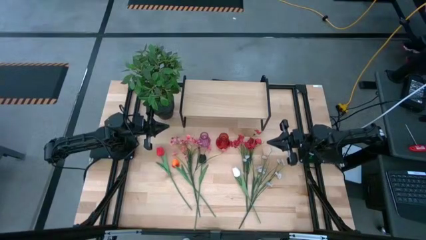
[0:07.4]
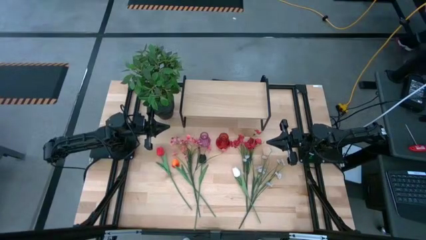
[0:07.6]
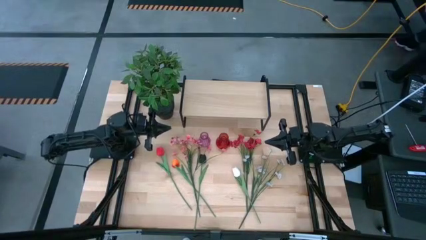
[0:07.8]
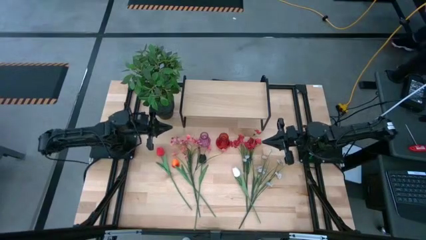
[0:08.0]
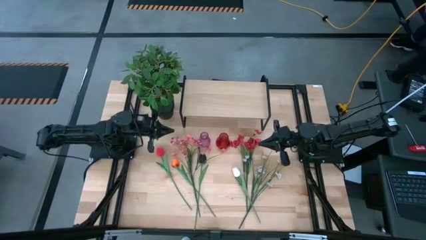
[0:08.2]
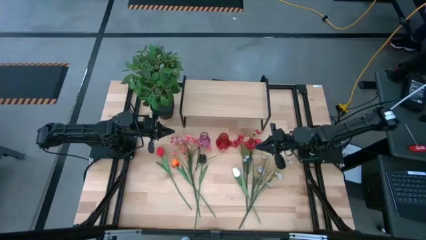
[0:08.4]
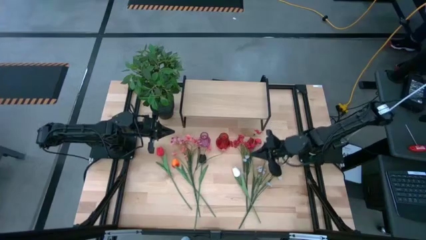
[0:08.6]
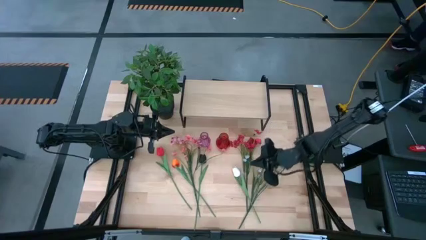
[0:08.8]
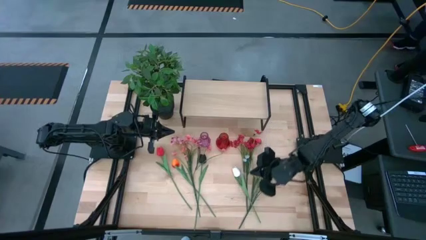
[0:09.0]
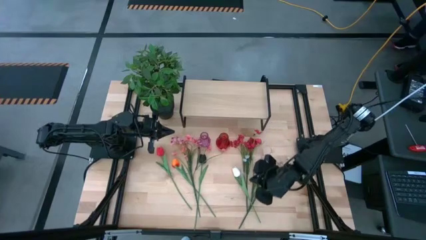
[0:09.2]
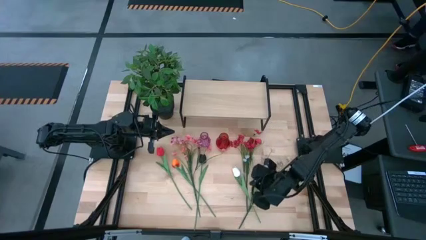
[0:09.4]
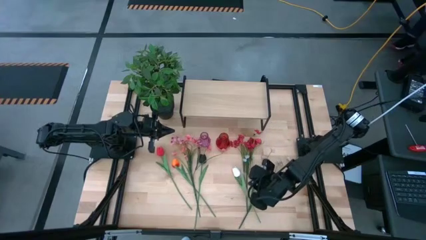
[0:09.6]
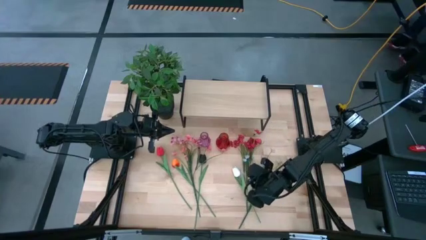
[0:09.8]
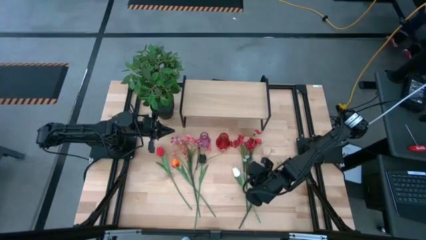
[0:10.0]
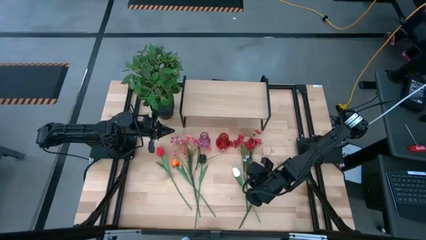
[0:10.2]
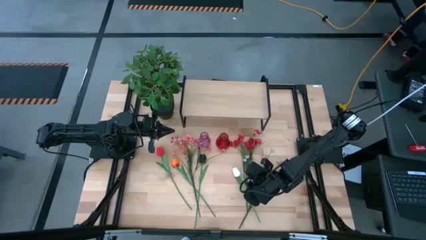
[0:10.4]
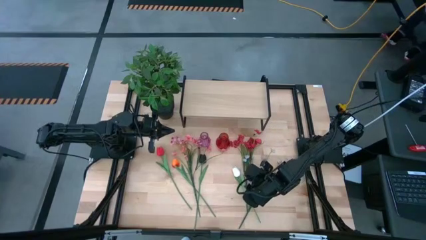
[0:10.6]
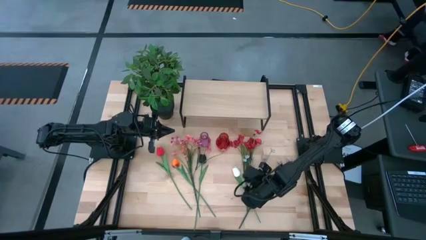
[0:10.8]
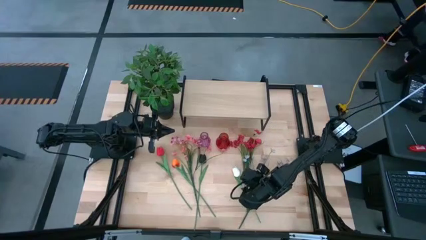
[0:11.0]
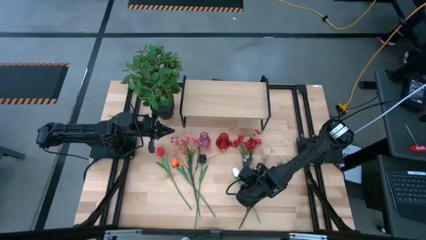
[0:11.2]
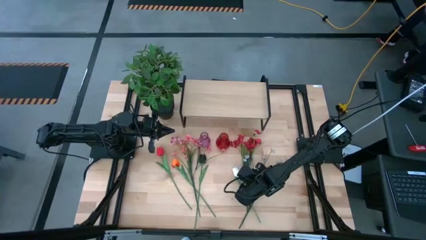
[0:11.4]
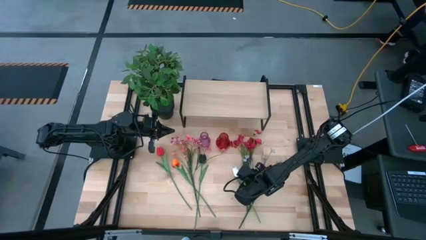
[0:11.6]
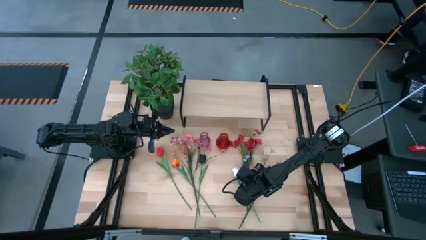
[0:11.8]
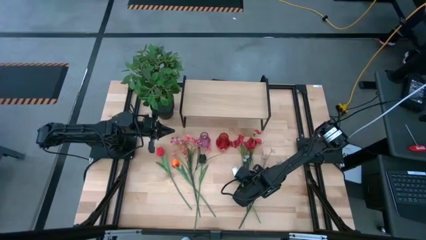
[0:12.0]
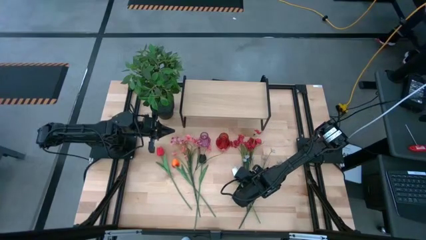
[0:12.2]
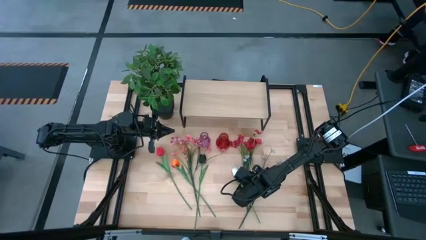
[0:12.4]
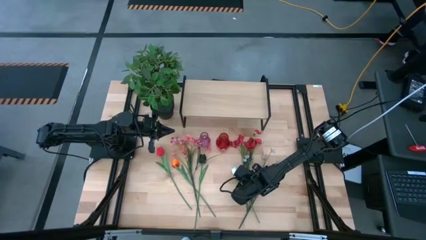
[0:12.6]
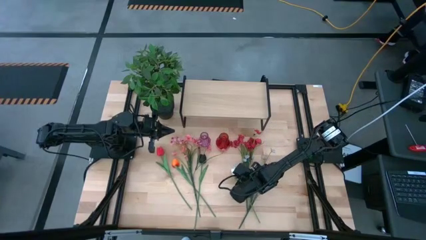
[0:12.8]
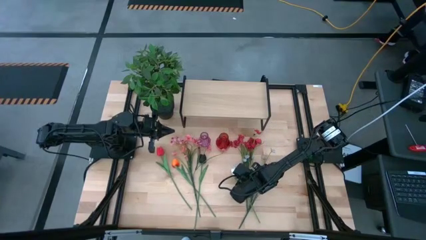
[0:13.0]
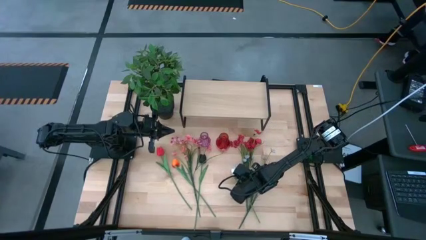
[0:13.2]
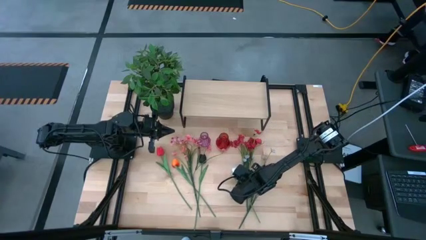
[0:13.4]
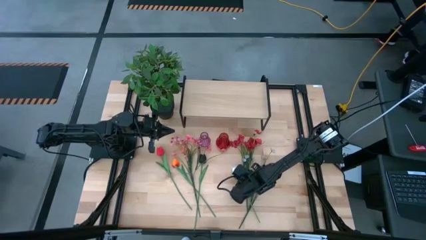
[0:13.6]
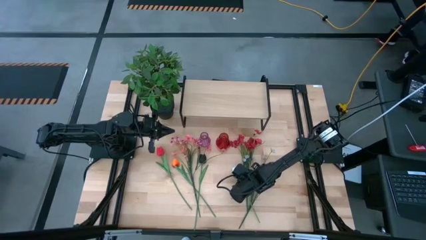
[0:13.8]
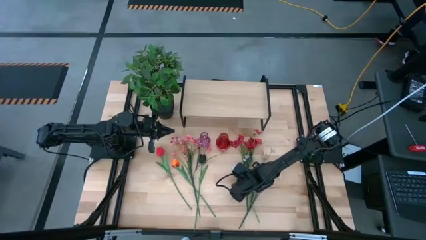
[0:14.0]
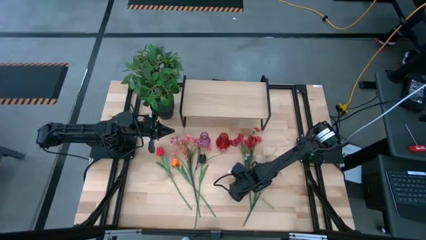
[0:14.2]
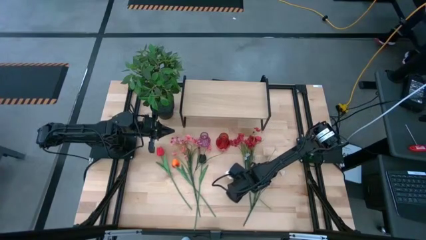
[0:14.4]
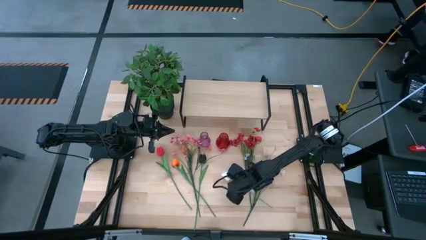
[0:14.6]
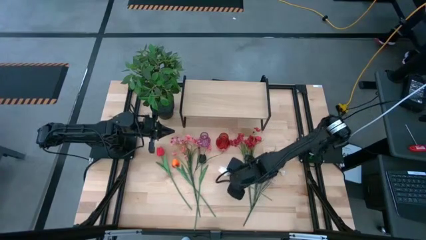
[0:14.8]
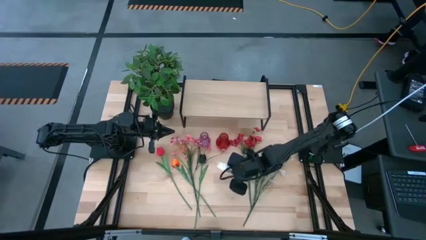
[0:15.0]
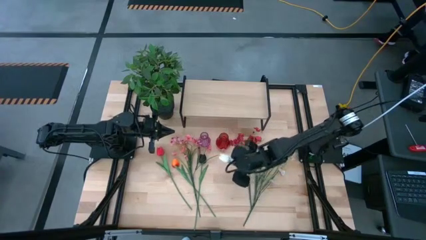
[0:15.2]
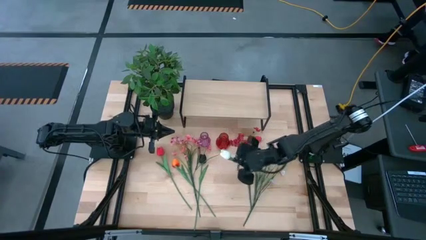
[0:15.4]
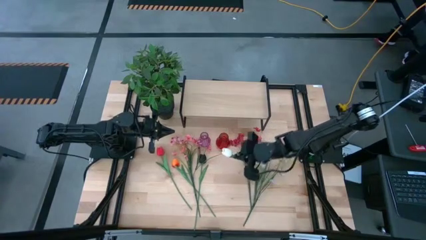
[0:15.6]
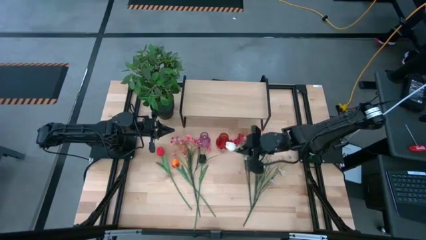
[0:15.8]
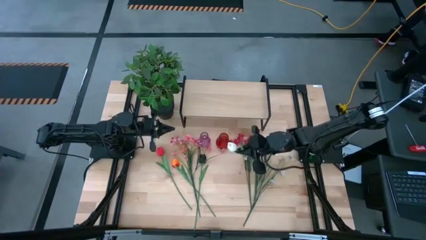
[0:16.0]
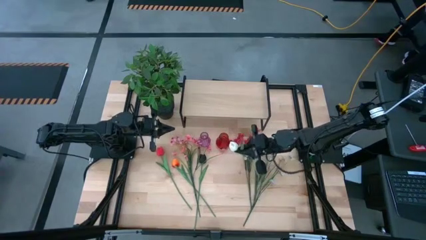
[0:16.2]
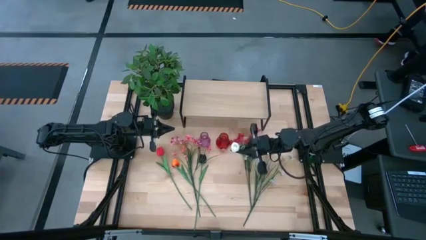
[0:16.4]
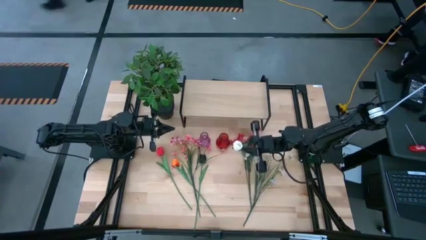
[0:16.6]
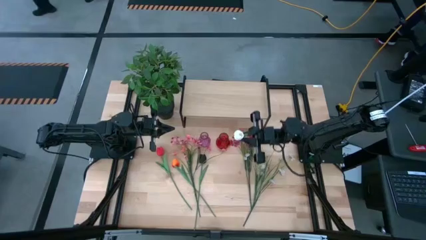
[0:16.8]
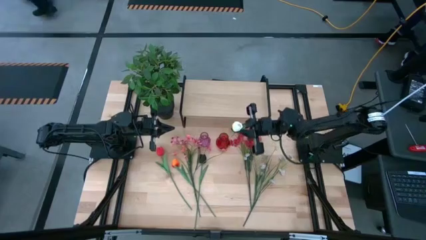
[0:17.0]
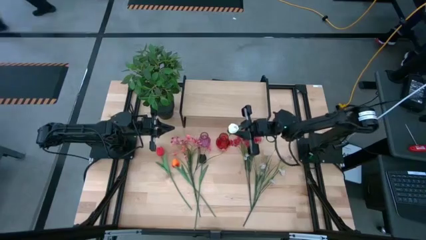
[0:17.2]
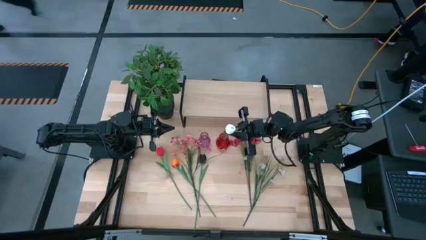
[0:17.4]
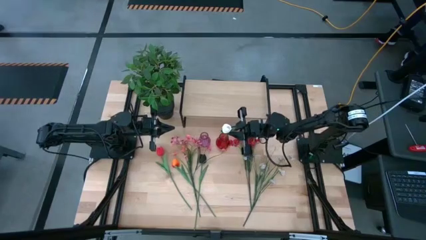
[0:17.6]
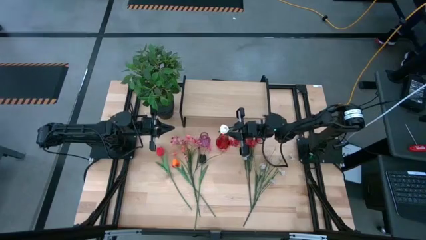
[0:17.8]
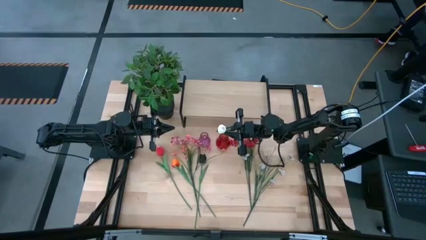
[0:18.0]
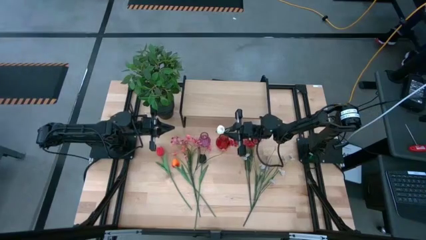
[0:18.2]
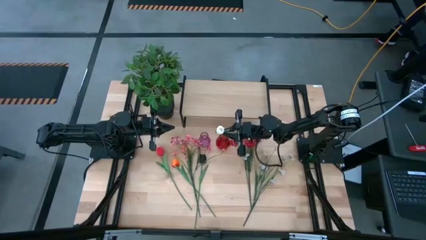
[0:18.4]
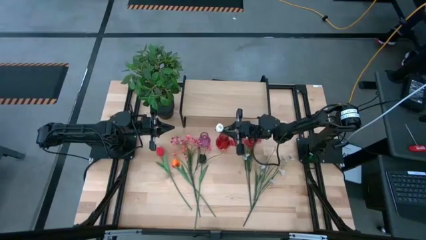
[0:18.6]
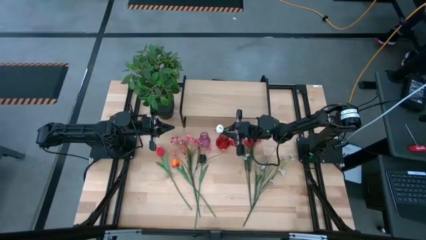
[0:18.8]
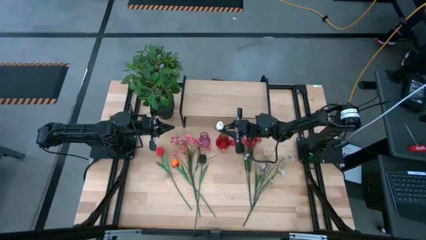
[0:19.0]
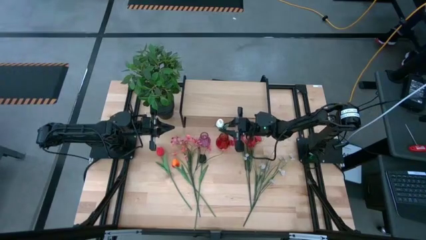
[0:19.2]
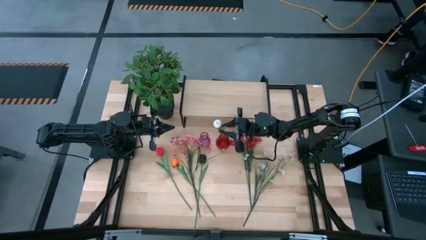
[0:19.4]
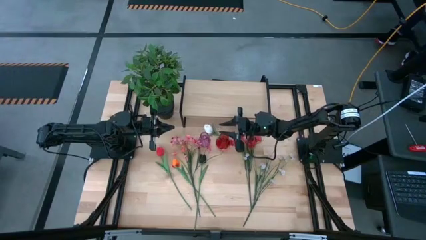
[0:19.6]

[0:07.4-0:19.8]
Task: Pick and place flowers into a vace then onto a shelf
Put the white flower into the red vase
